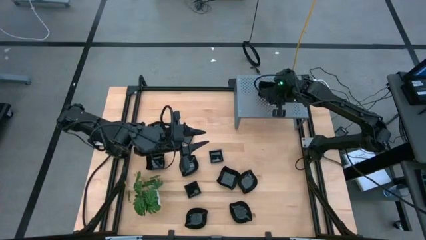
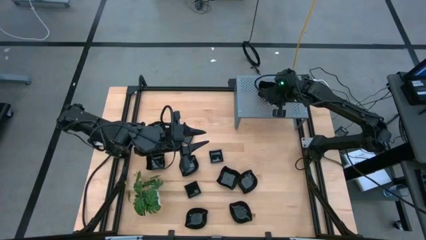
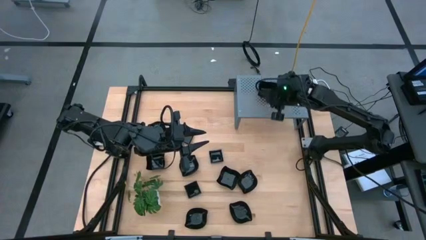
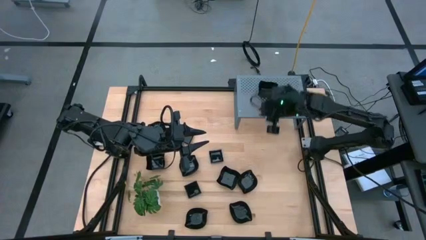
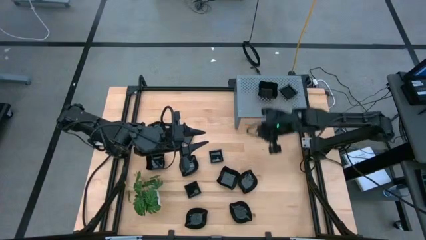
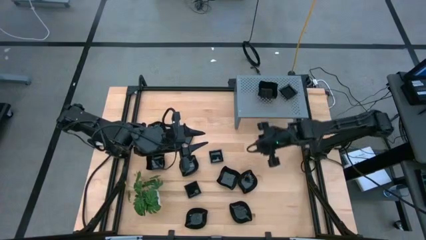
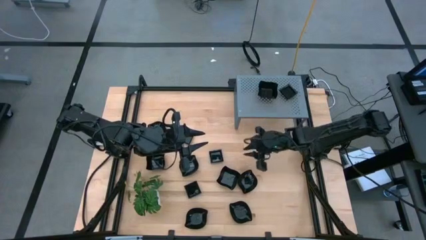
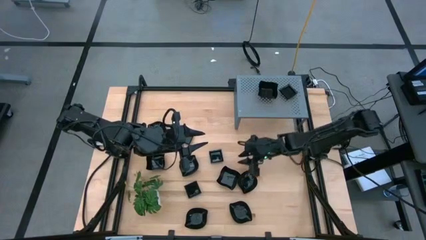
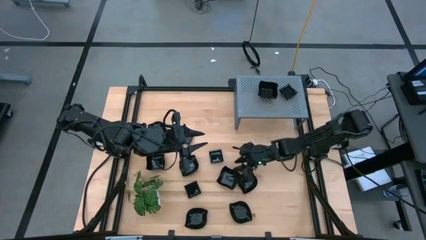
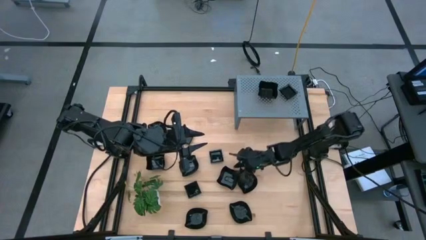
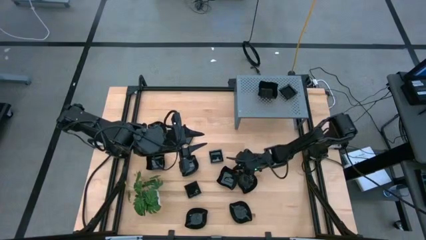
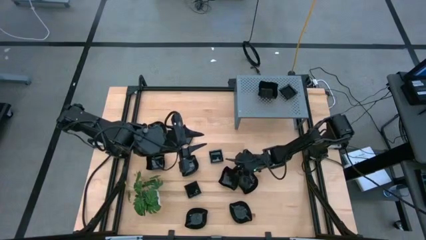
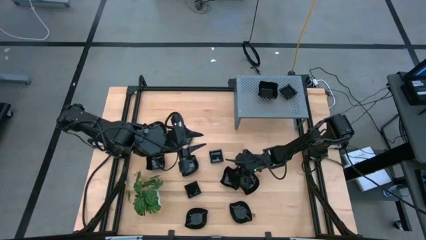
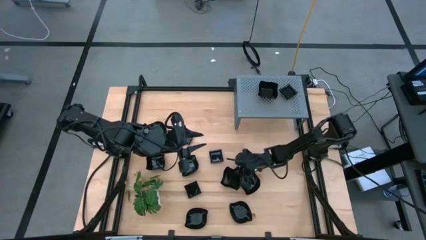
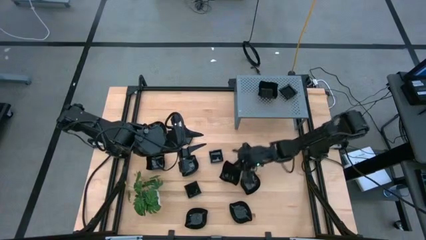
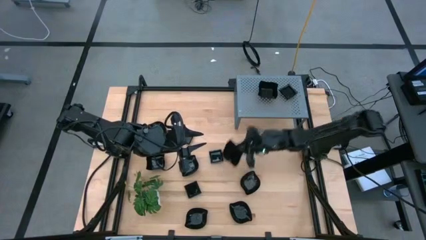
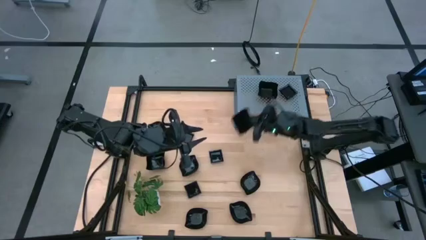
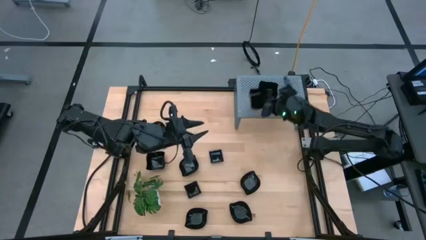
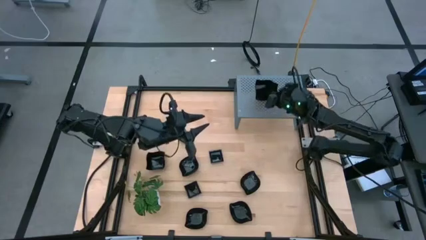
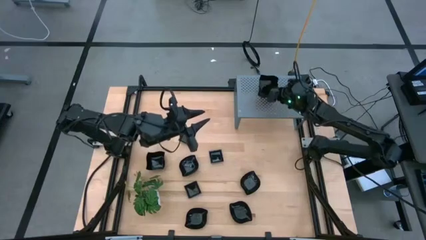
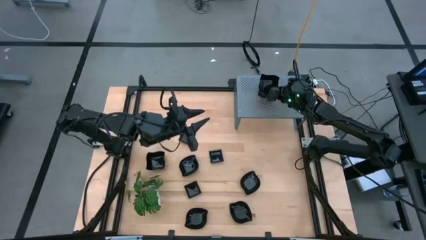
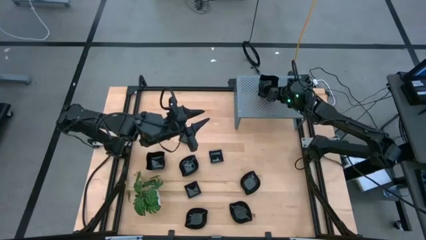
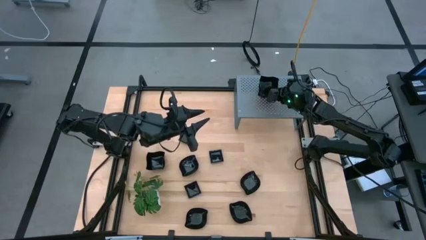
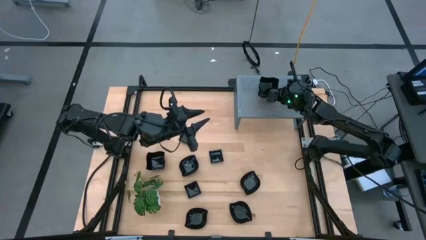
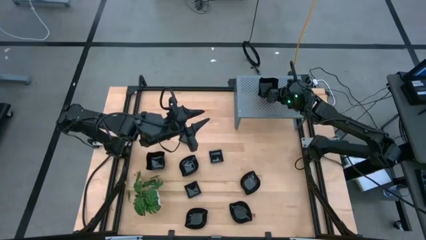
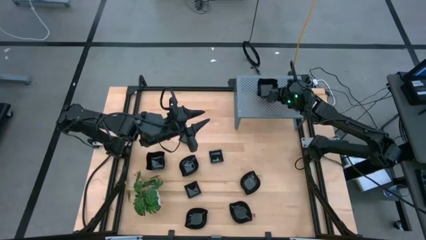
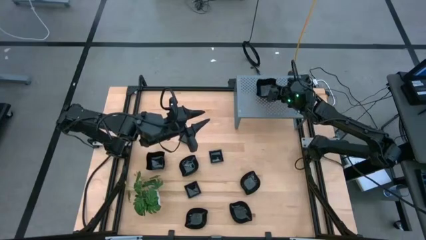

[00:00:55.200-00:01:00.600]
Task: Pick & Place Mini shaped plates
Stack the black distorted square plate on the black distorted square plates on the shelf

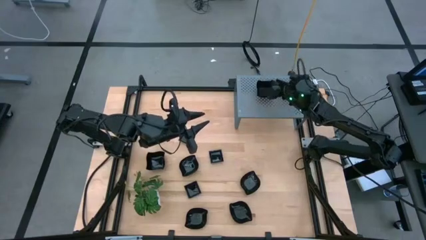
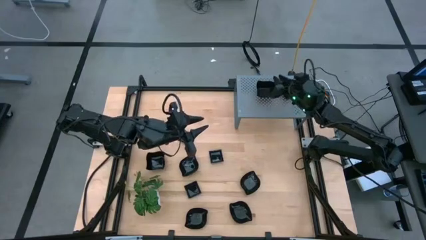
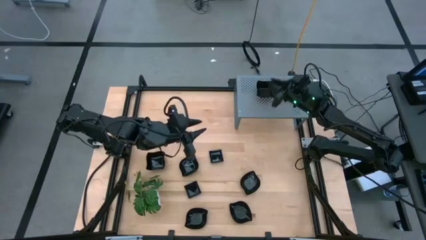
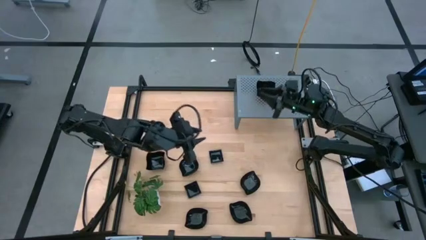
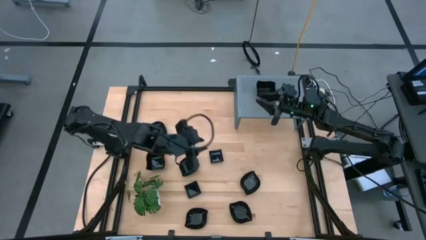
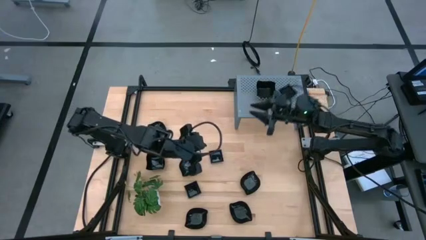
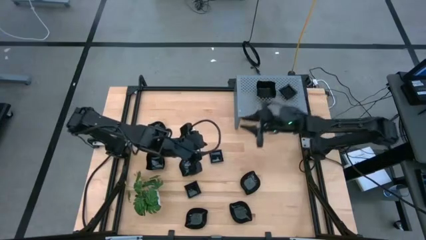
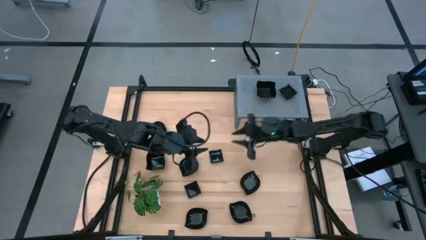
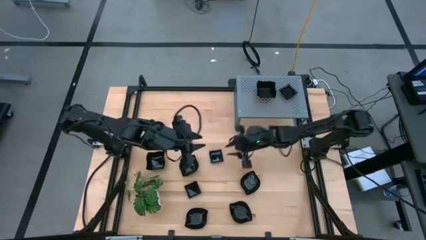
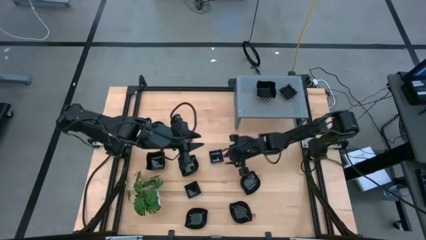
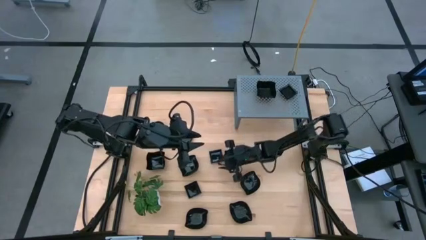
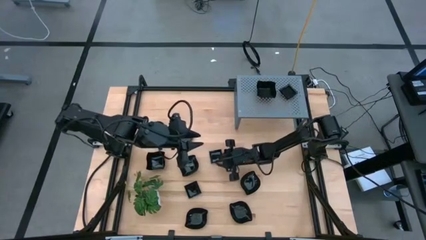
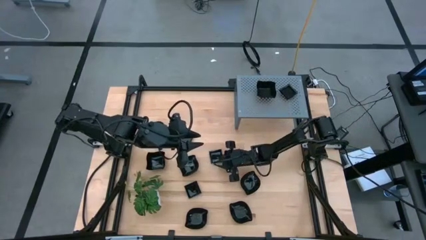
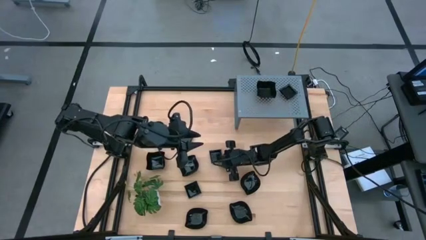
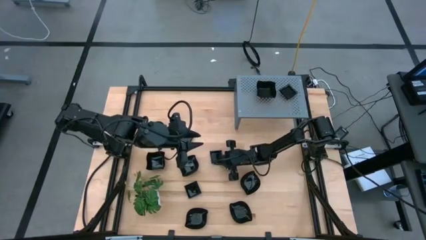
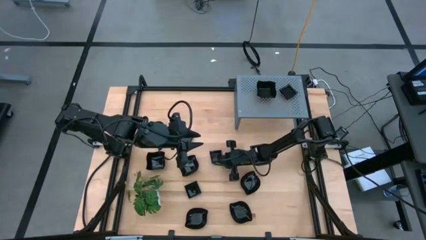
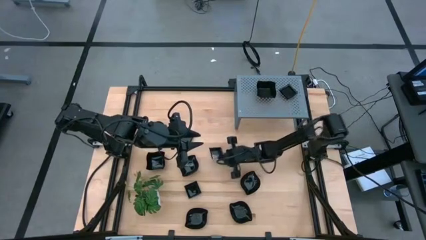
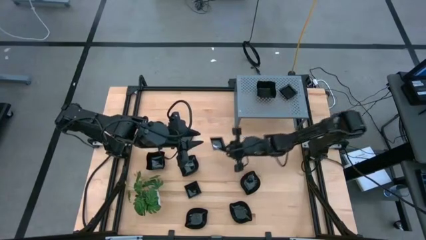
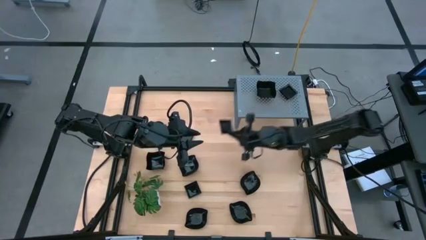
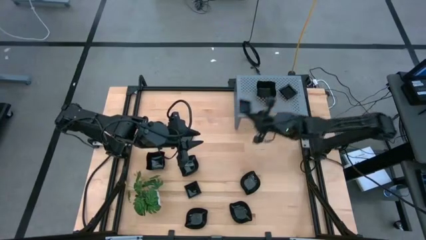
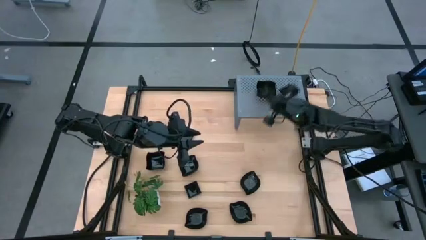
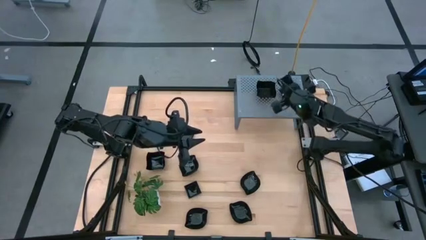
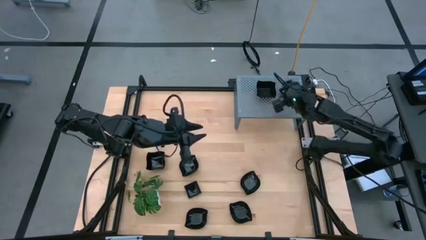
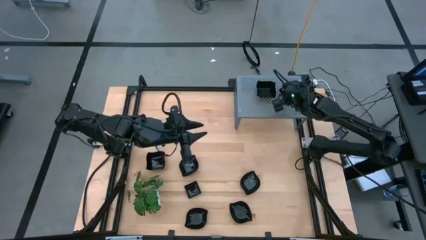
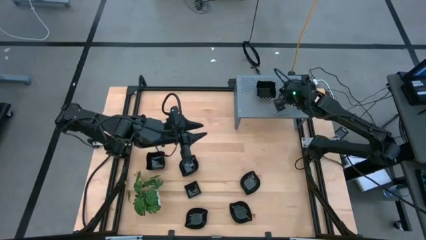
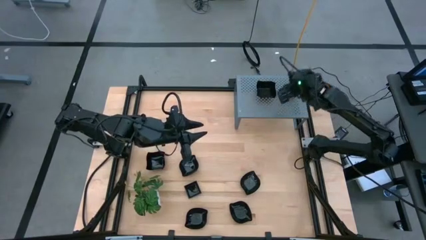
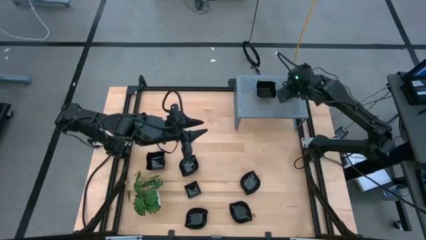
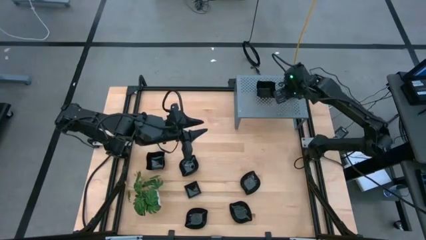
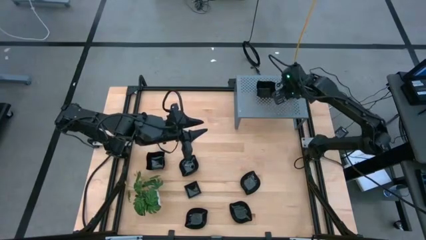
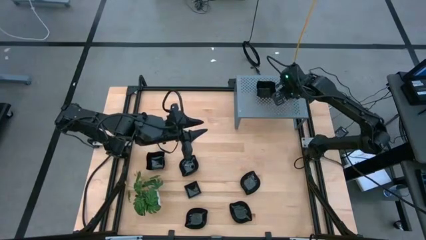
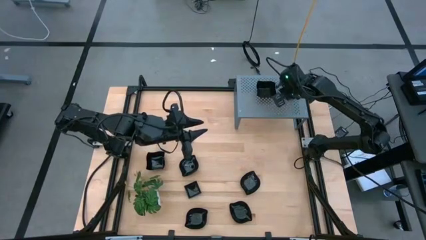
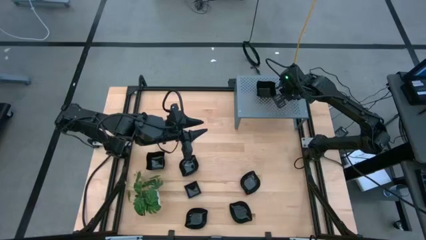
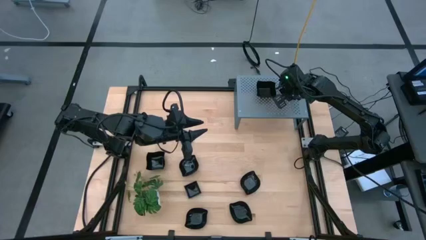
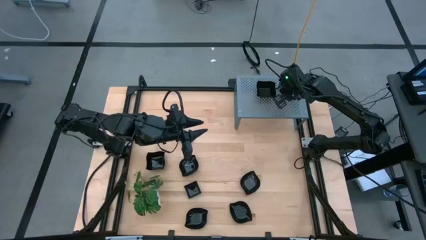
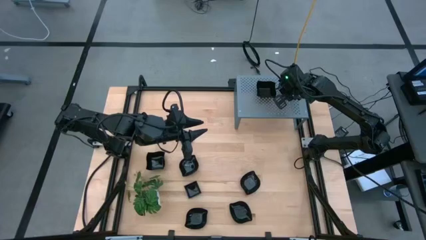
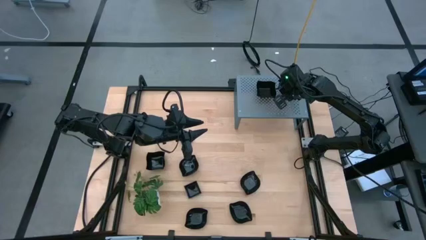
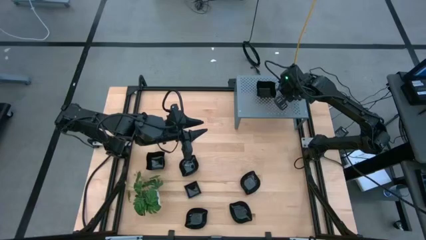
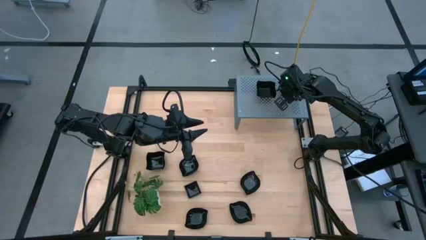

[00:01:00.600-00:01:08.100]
Stack the black square plate on the black square plates on the shelf

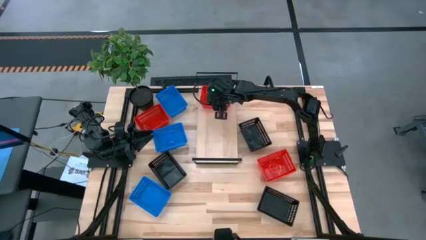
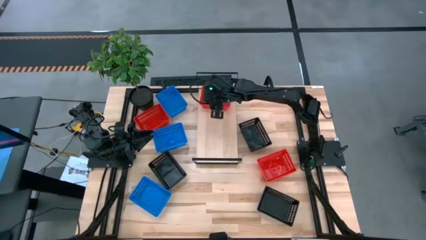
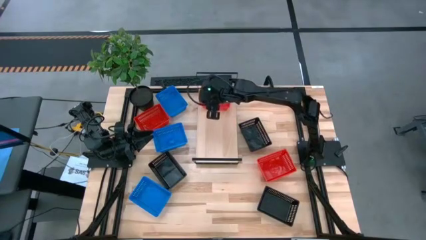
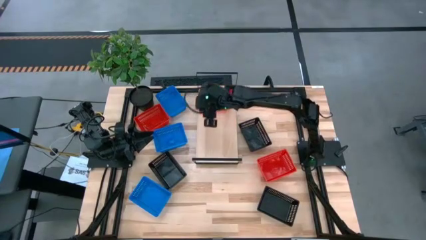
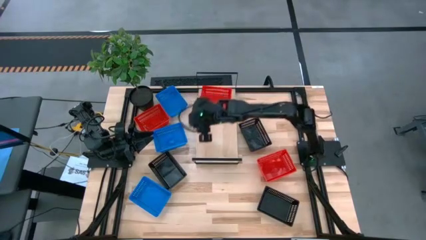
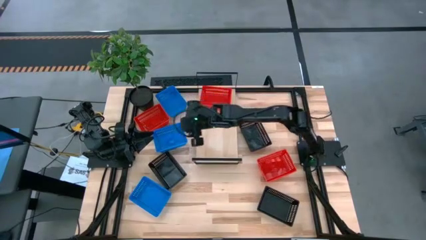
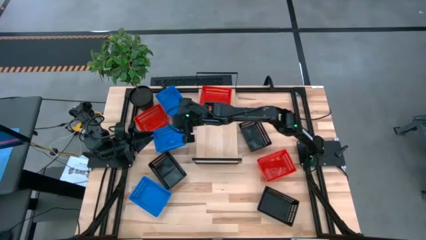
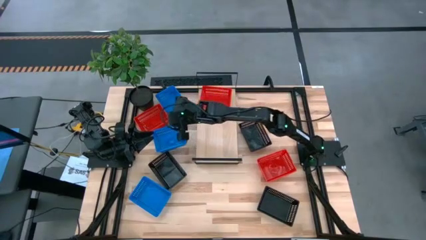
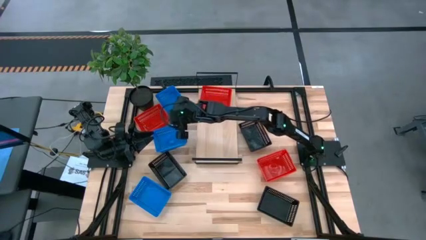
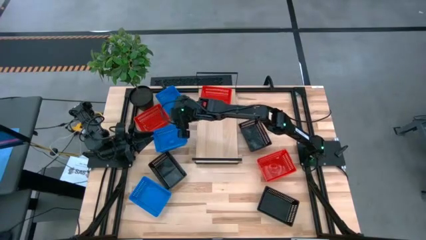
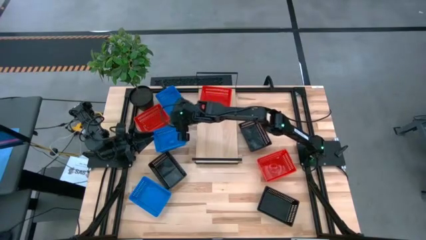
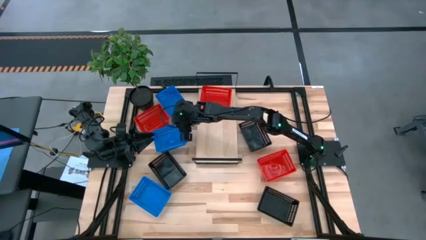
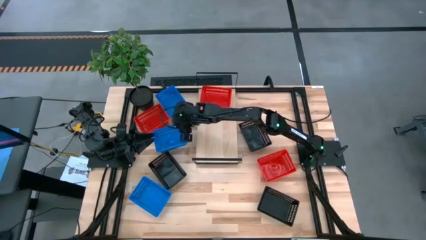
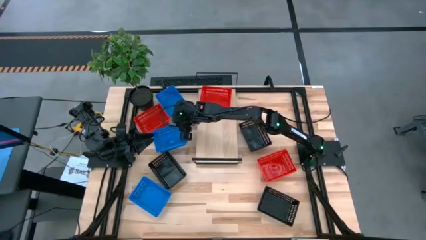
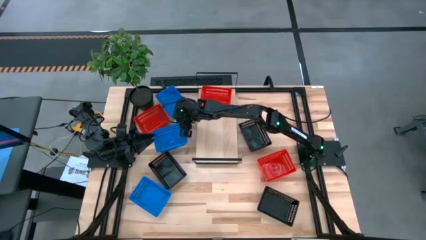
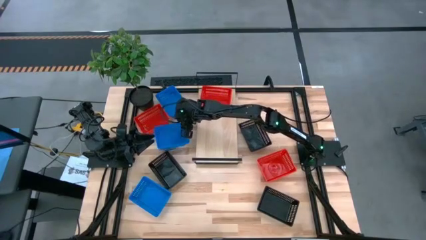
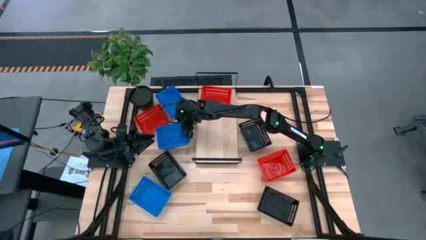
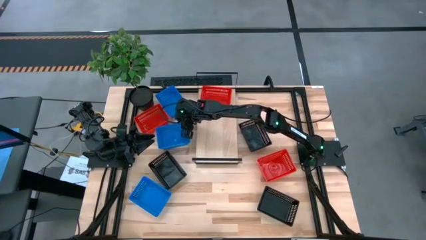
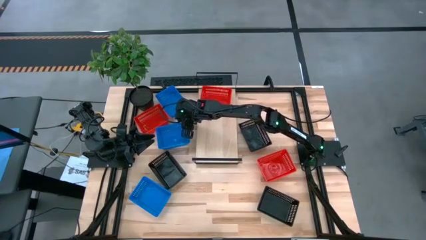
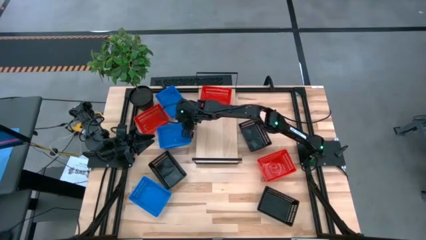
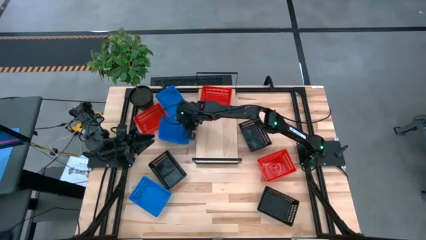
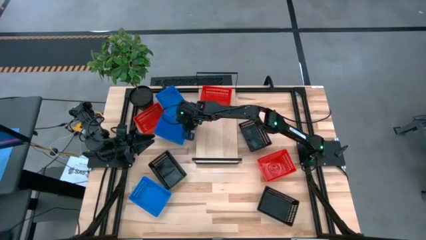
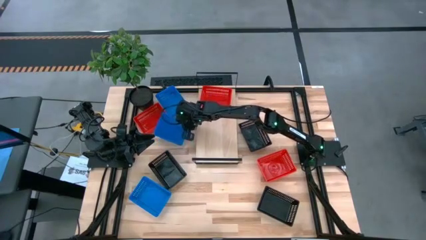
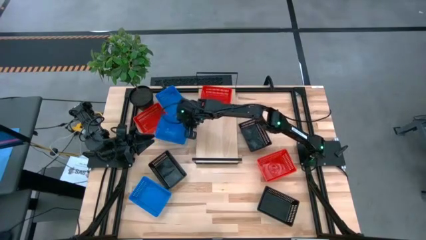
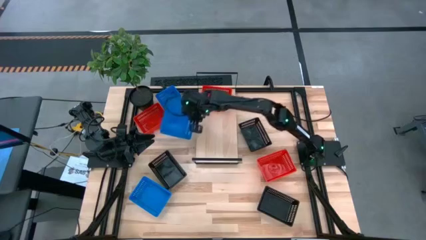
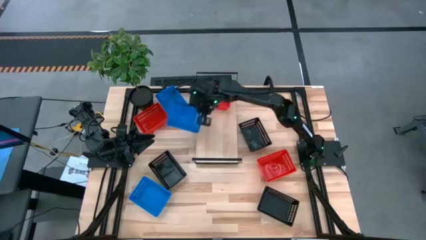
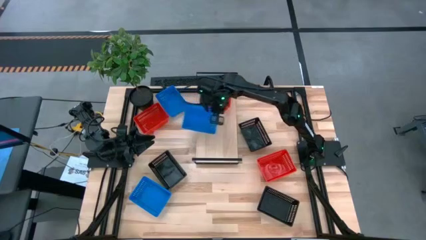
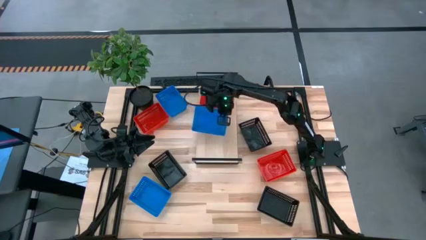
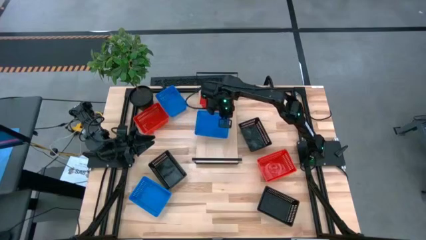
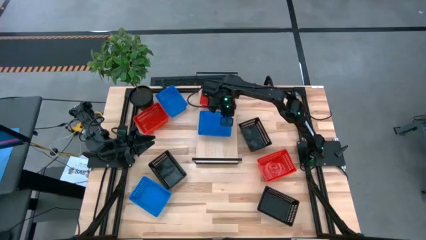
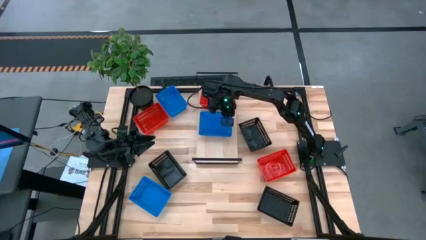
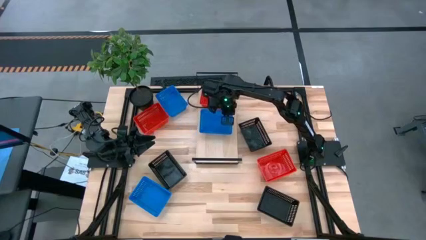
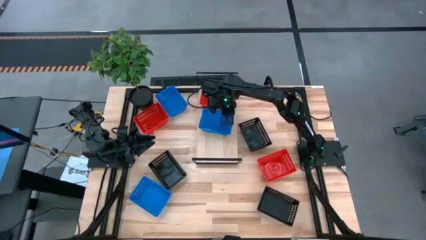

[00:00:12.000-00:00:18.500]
Task: Stack baskets on shelf by color
Put the middle blue bin on the shelf
